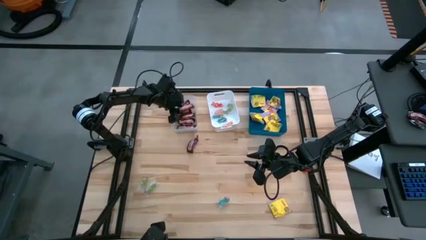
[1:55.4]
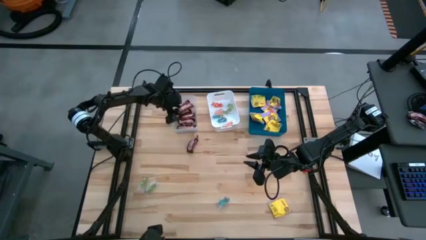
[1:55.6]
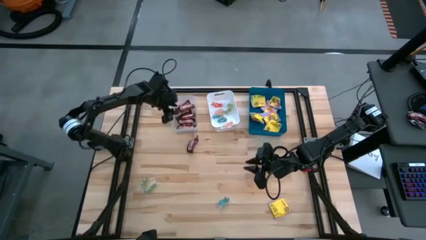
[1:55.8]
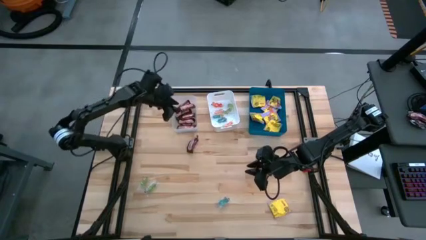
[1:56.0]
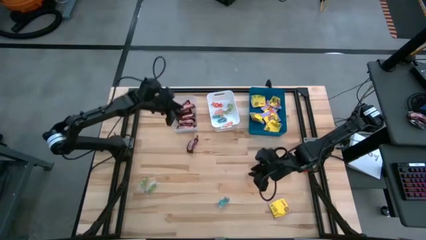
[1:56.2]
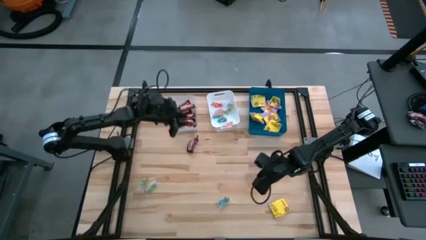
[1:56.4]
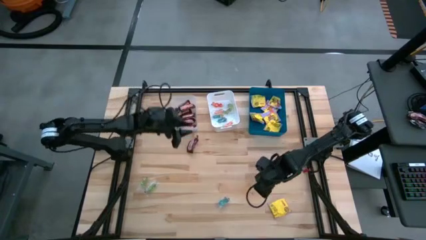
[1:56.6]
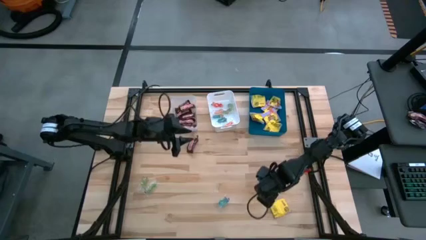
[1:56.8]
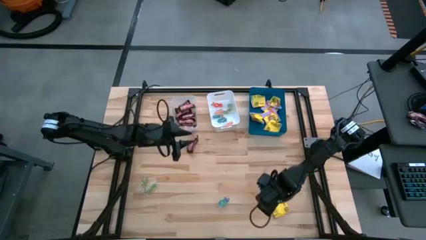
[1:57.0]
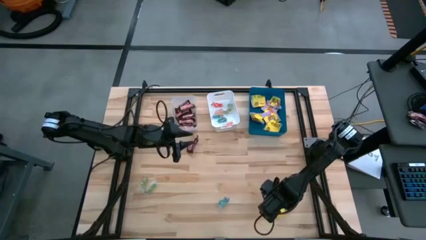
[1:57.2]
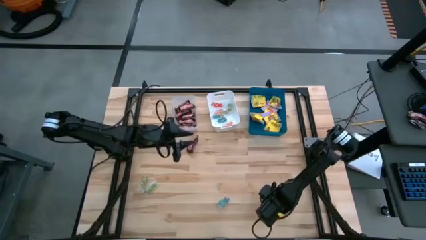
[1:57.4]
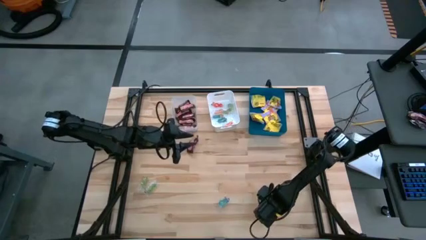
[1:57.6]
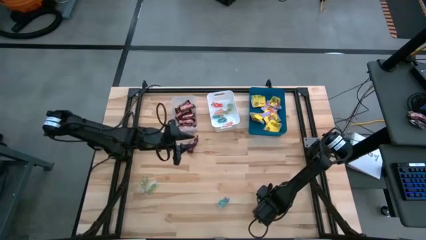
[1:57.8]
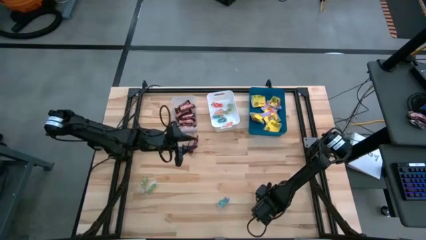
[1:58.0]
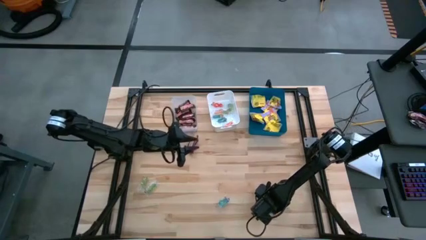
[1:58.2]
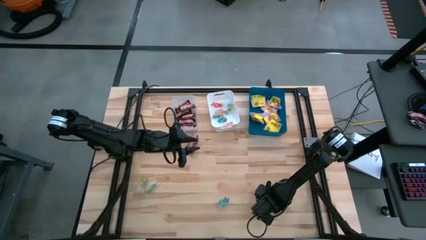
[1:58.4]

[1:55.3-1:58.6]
Task: Sort candy
Put the yellow sour patch candy into the blue bin

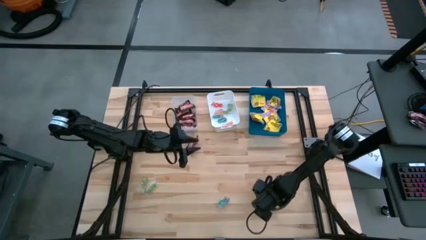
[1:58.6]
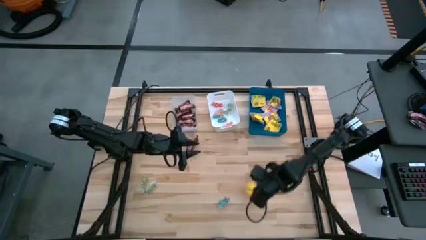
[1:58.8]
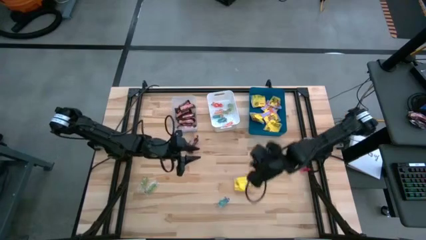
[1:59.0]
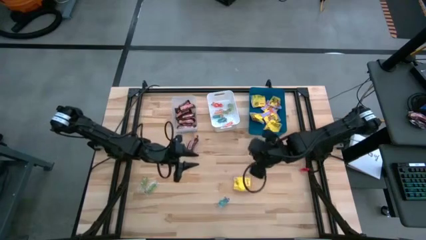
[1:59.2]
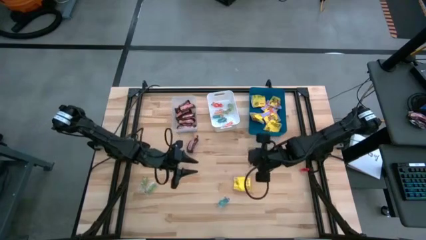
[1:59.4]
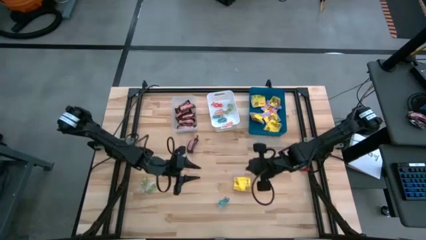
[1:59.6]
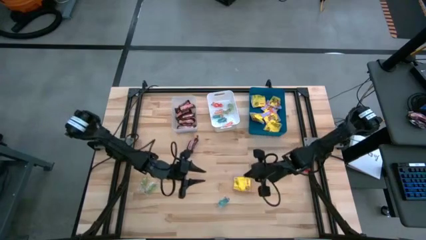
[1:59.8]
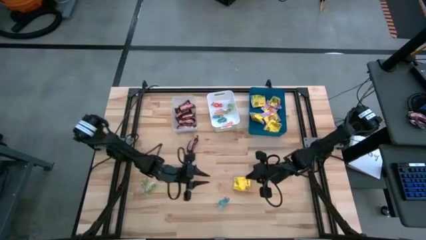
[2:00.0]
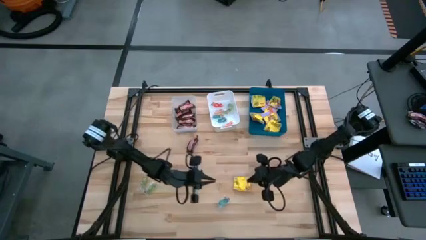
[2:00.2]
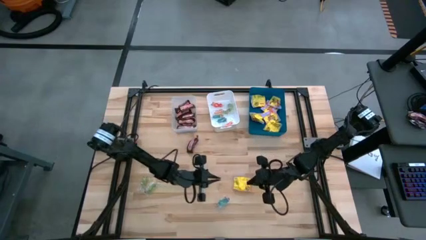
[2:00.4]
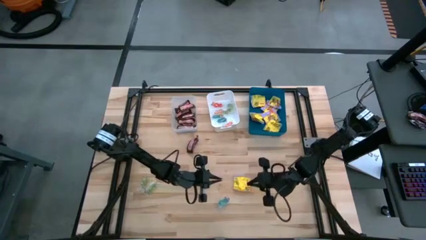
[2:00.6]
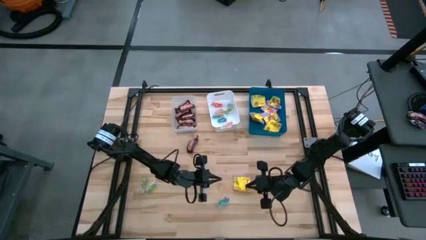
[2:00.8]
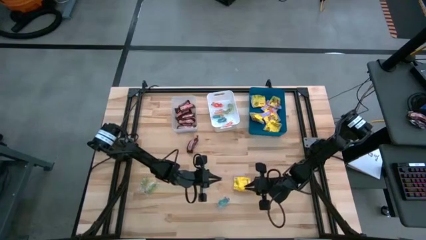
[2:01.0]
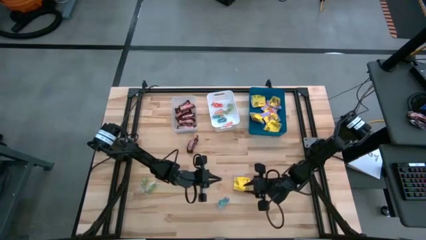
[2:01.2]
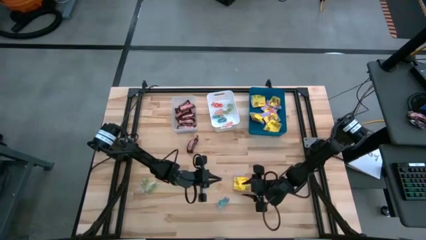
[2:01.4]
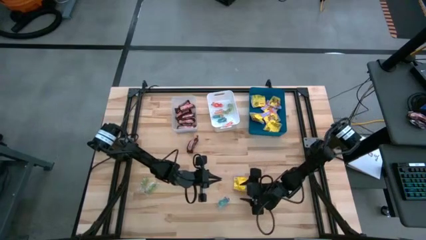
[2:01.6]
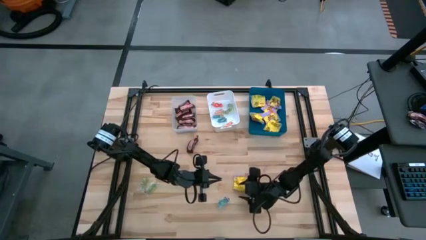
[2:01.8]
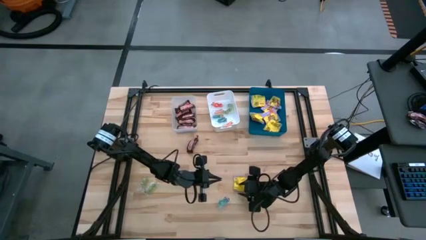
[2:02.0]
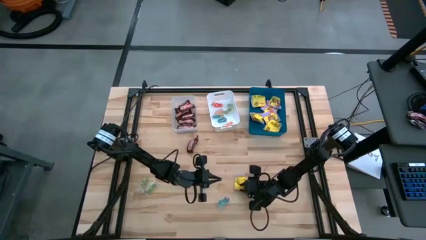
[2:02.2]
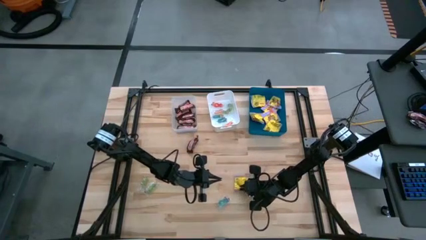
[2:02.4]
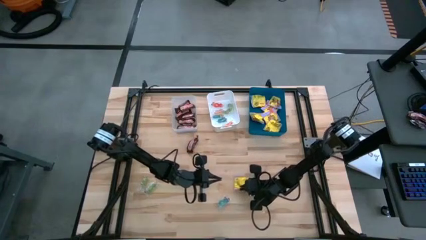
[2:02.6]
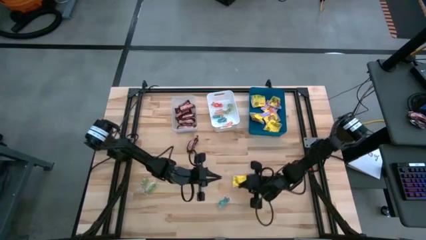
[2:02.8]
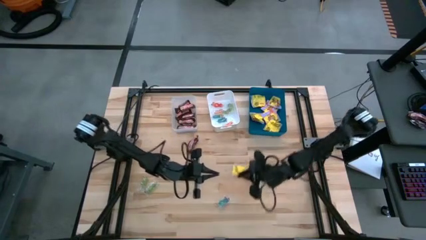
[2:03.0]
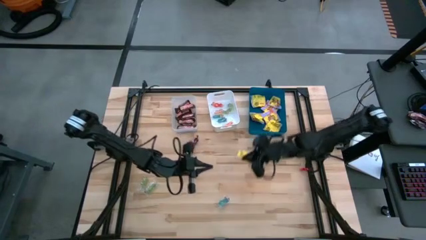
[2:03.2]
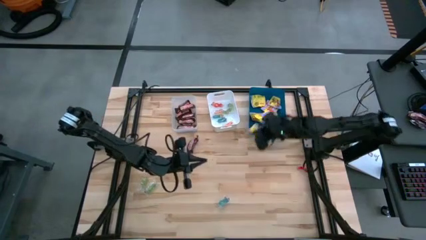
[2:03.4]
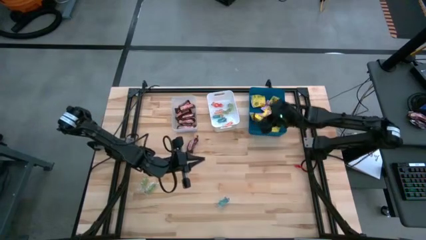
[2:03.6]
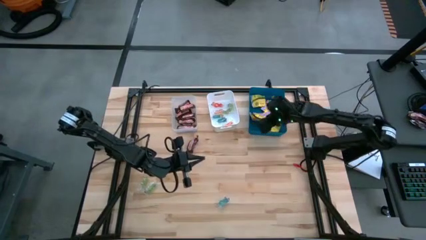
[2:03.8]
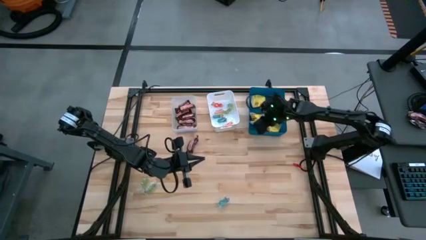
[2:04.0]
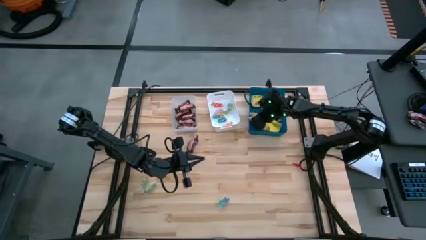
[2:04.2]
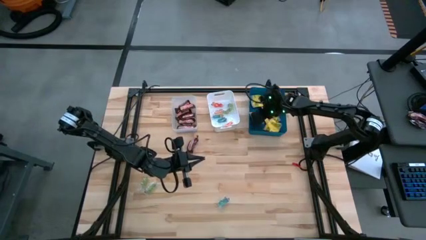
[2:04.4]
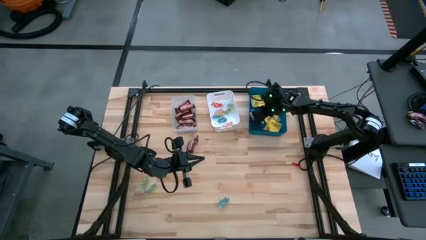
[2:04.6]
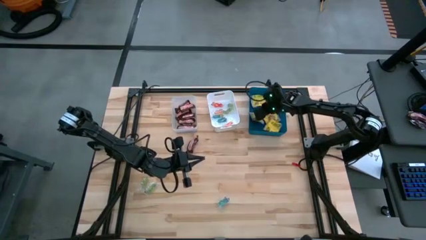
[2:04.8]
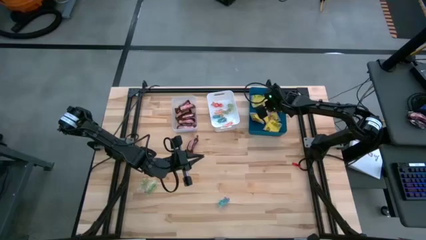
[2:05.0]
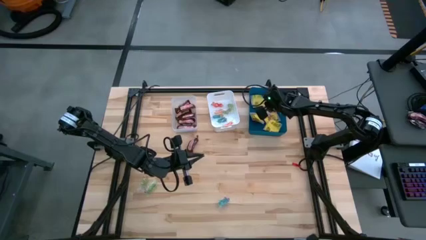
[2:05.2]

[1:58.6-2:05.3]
Put the yellow sour patch candy into the blue bin

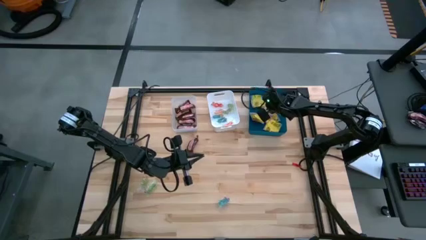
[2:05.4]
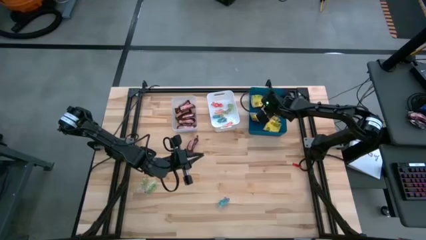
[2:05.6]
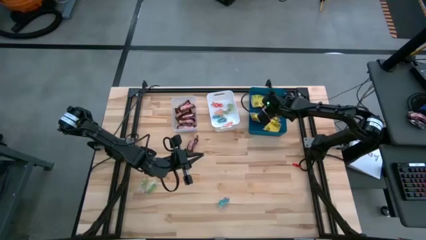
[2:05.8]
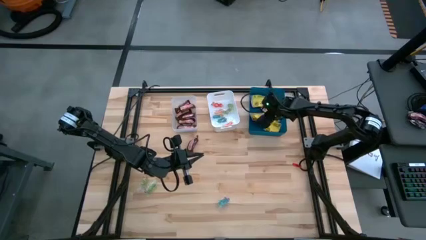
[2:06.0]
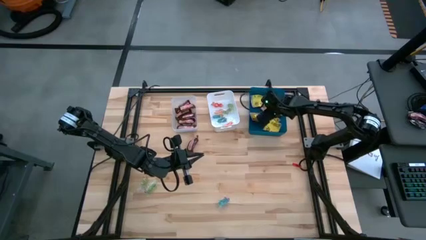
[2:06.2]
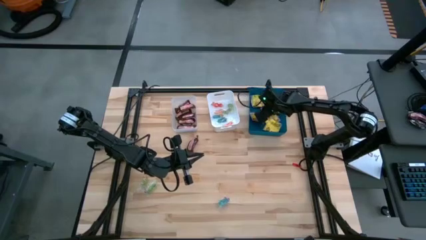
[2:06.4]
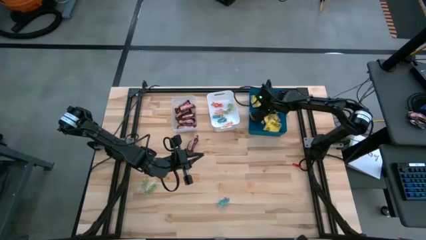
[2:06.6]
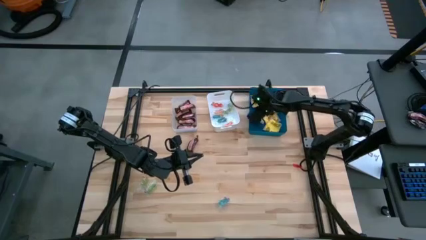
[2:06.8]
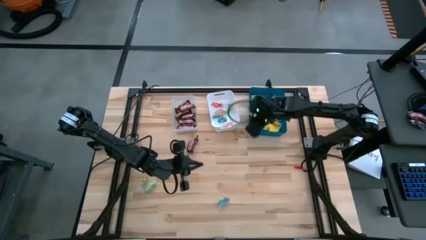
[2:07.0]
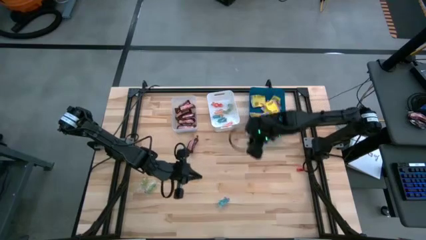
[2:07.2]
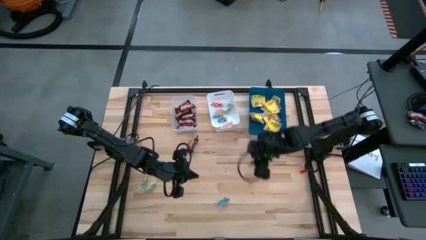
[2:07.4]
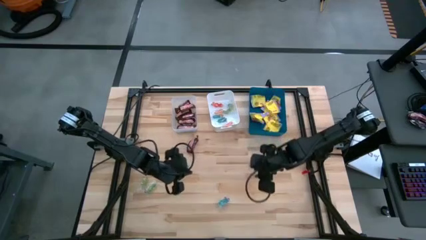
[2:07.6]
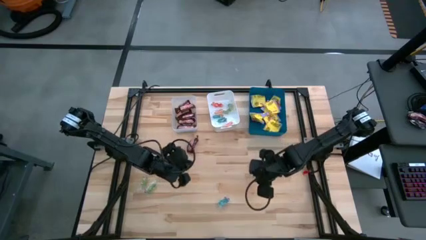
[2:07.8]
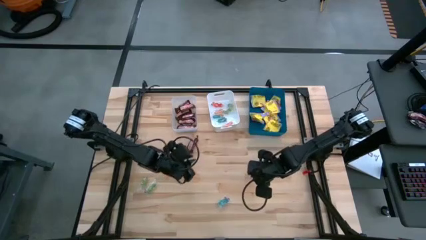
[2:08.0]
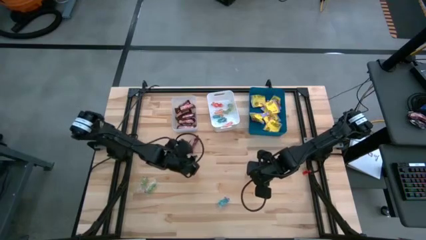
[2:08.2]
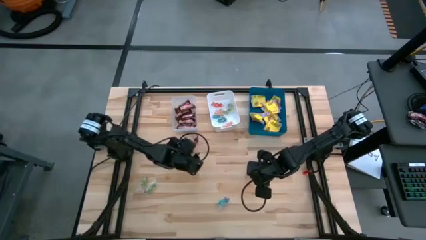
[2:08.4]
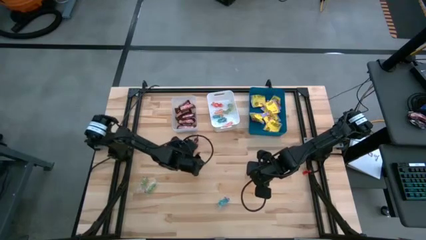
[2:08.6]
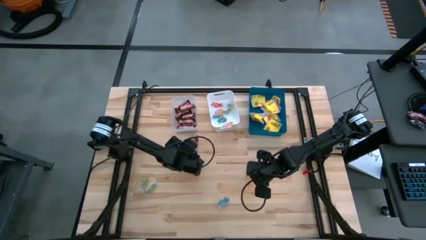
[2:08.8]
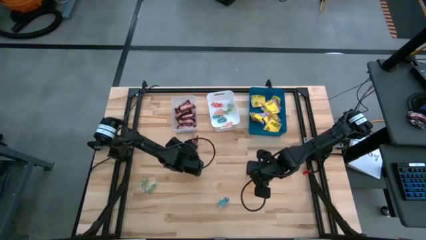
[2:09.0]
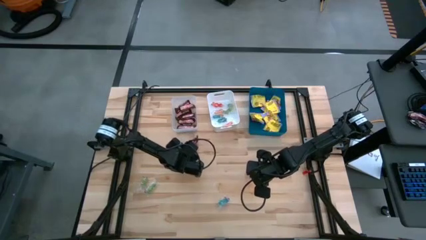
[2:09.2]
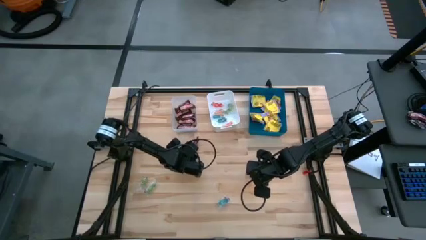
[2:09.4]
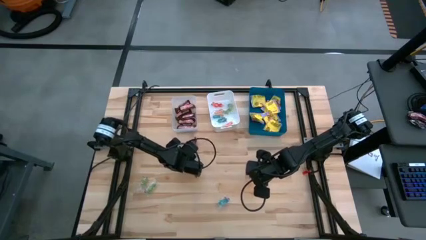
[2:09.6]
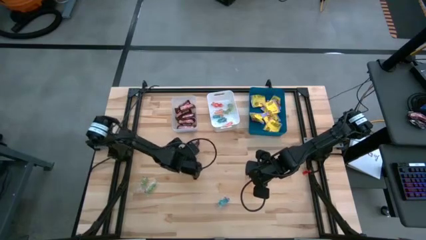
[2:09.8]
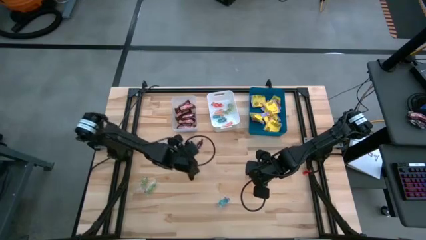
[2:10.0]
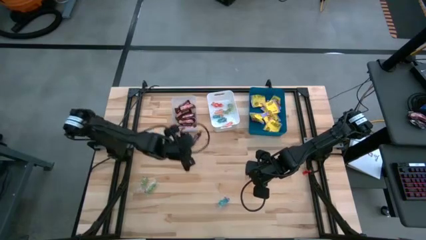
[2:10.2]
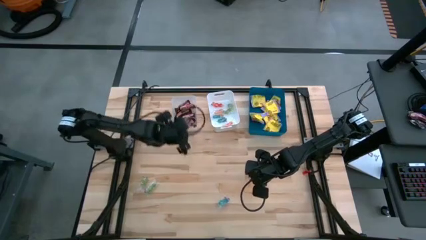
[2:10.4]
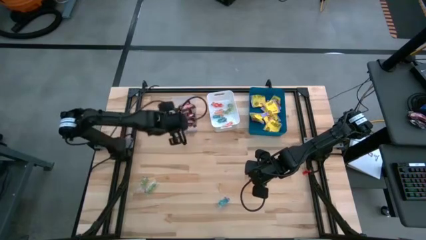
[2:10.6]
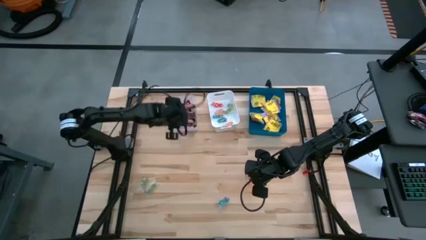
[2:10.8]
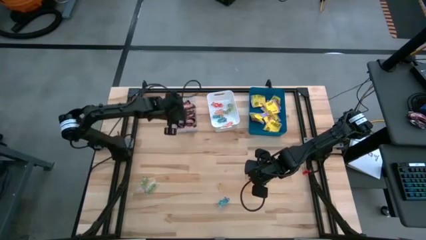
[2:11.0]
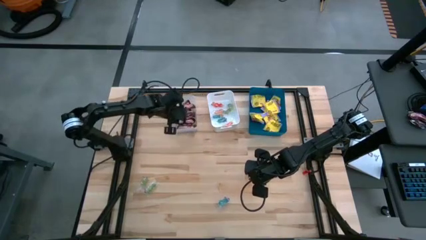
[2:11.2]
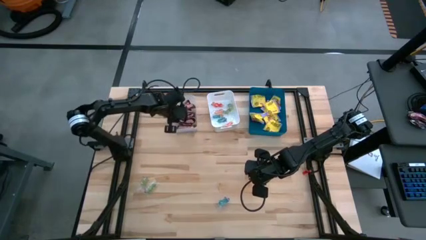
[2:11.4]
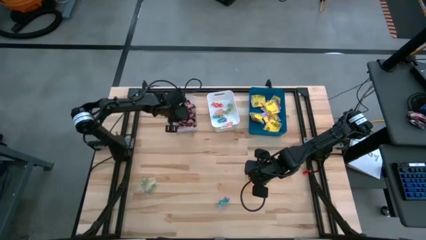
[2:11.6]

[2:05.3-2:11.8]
Put the brown candy bar into the transparent bin
